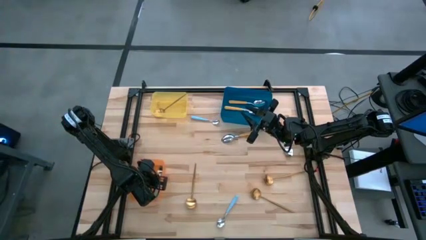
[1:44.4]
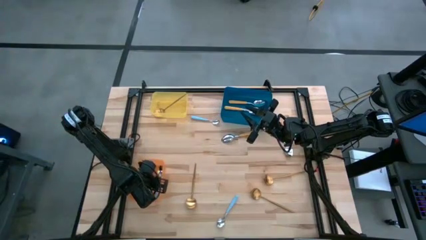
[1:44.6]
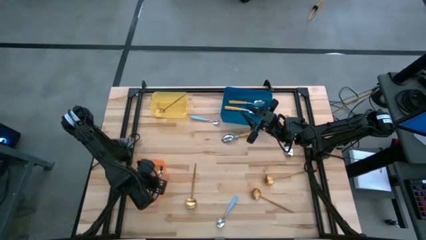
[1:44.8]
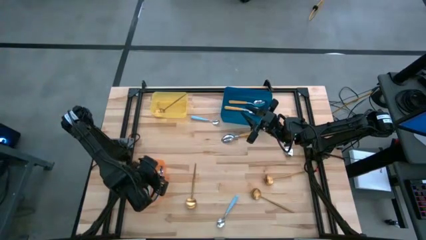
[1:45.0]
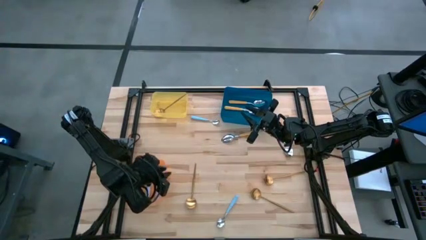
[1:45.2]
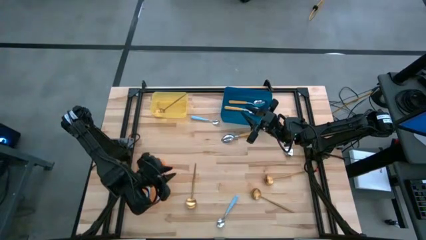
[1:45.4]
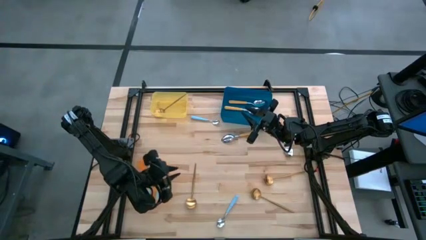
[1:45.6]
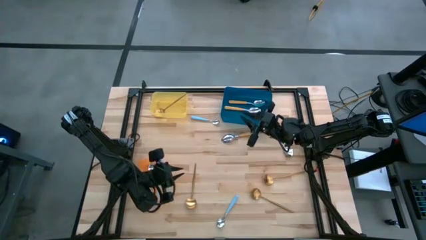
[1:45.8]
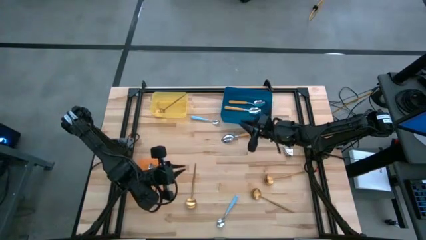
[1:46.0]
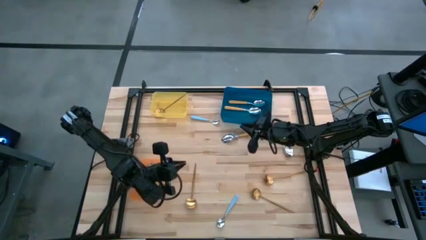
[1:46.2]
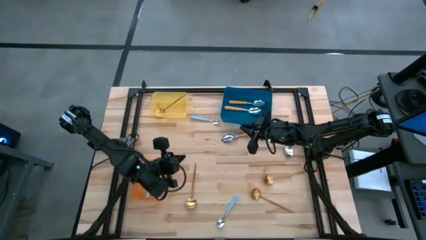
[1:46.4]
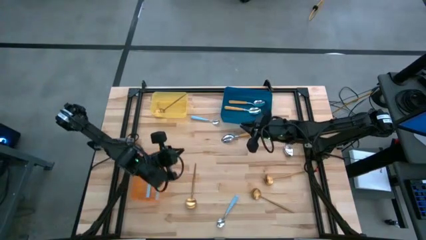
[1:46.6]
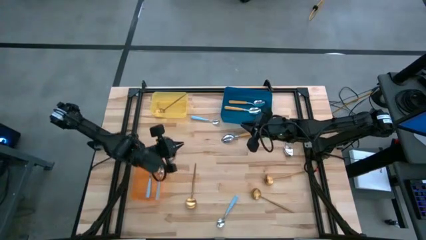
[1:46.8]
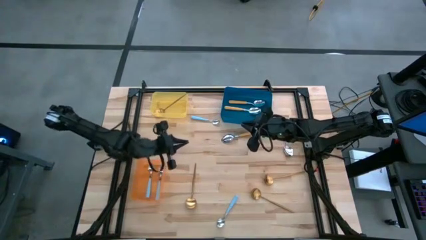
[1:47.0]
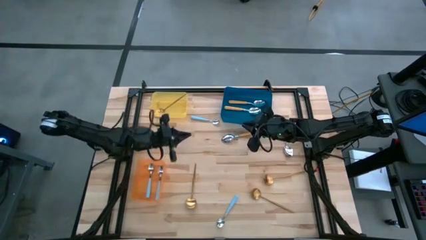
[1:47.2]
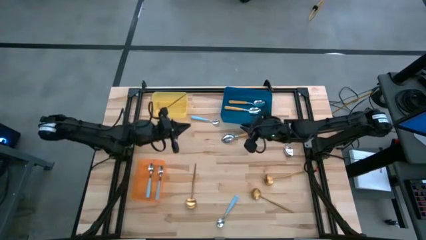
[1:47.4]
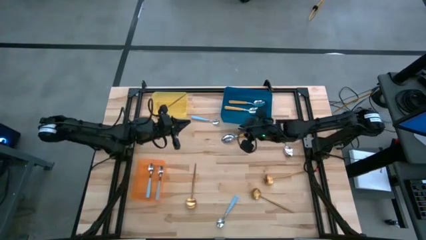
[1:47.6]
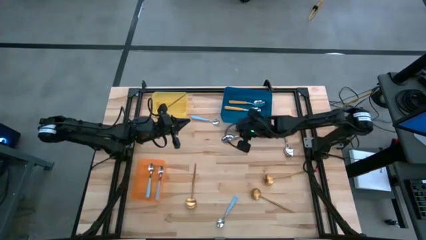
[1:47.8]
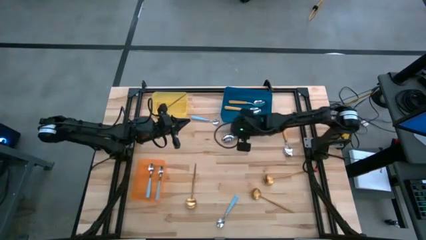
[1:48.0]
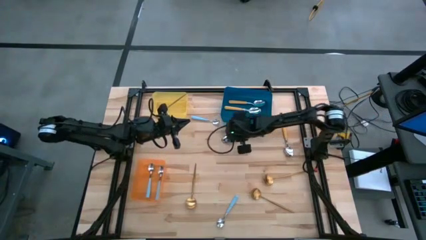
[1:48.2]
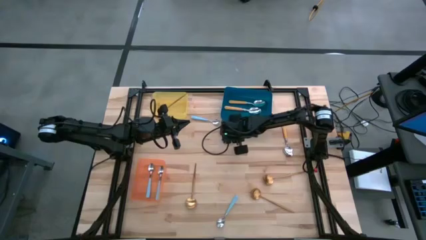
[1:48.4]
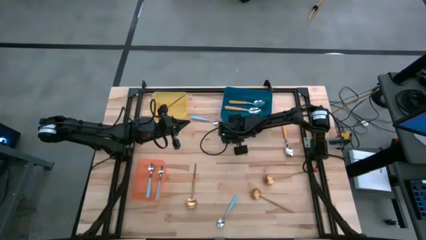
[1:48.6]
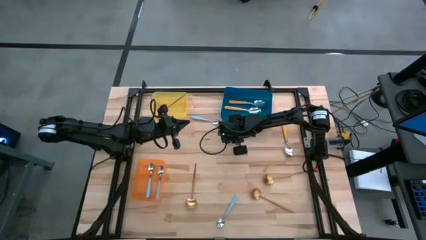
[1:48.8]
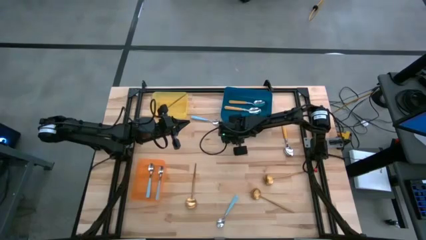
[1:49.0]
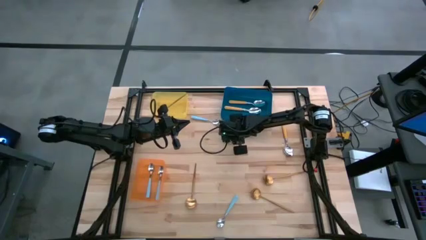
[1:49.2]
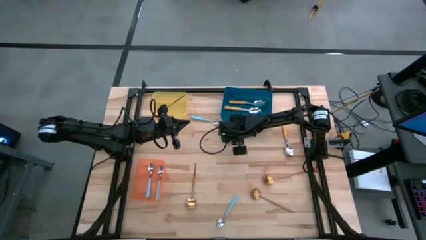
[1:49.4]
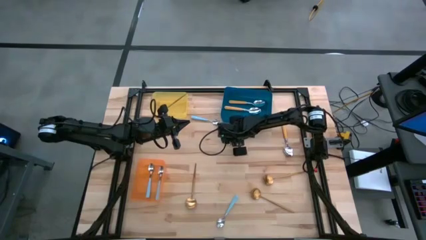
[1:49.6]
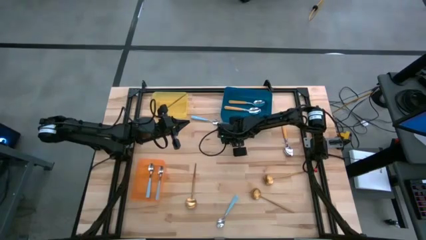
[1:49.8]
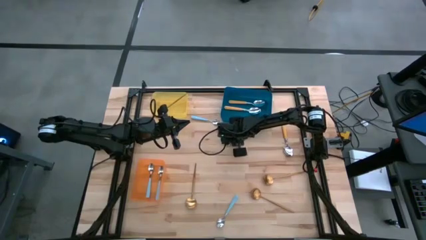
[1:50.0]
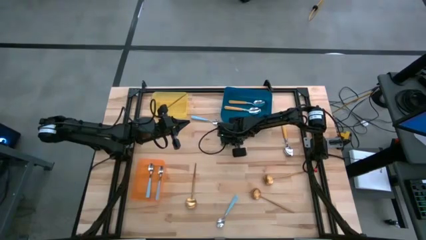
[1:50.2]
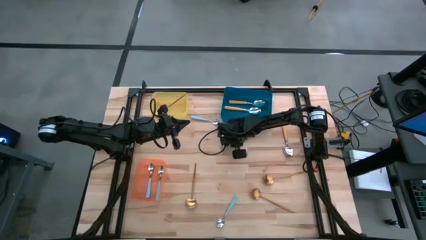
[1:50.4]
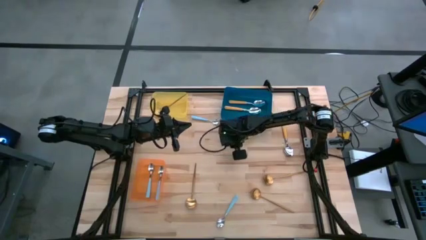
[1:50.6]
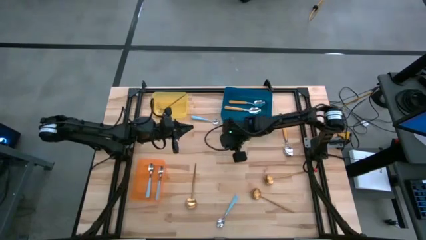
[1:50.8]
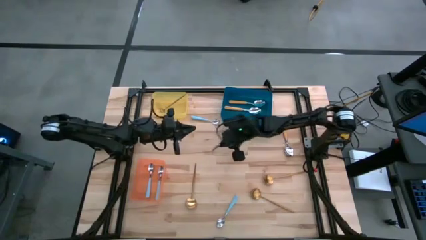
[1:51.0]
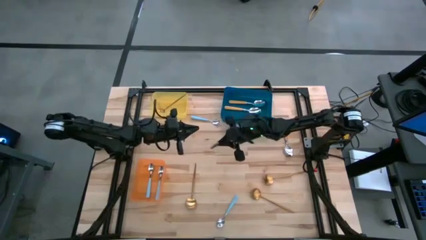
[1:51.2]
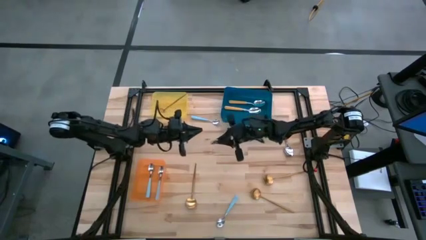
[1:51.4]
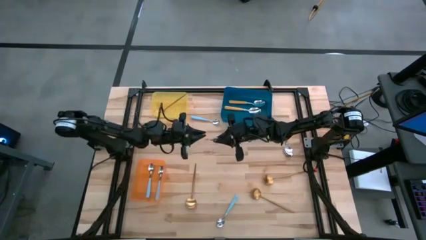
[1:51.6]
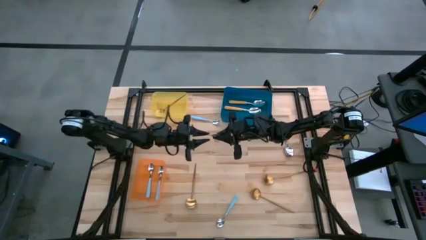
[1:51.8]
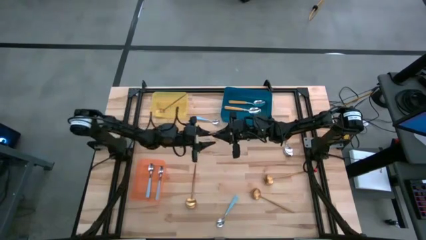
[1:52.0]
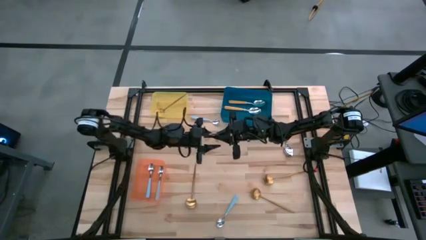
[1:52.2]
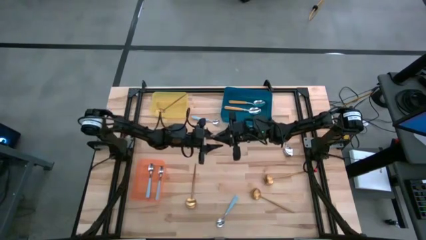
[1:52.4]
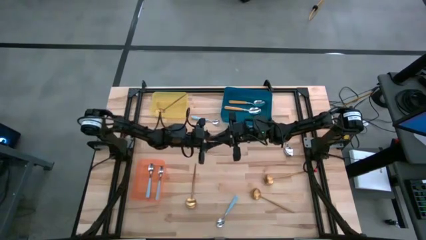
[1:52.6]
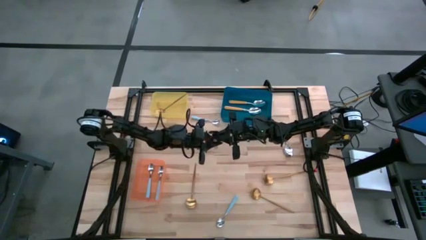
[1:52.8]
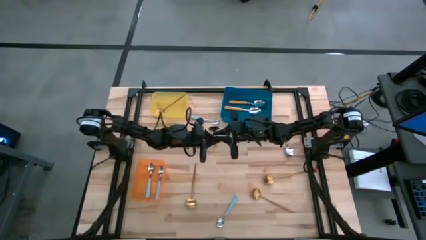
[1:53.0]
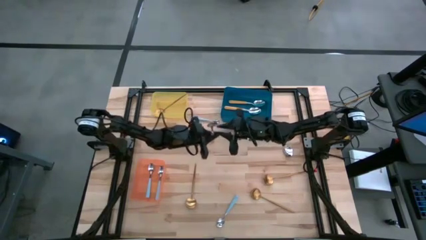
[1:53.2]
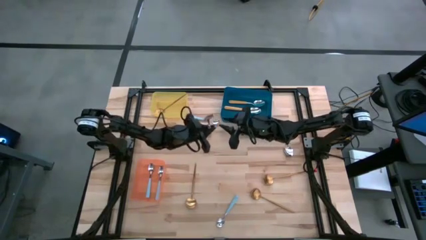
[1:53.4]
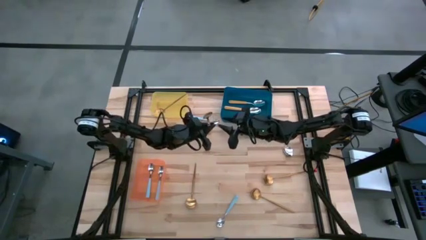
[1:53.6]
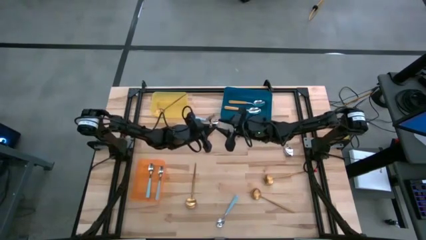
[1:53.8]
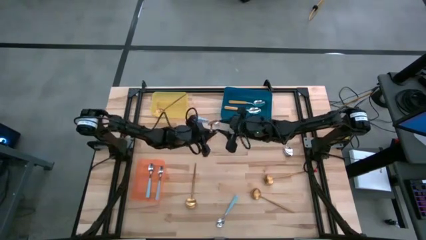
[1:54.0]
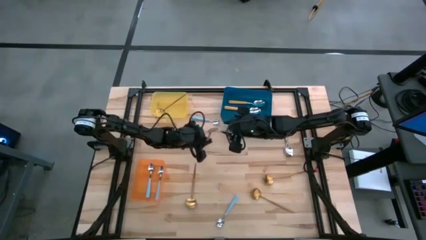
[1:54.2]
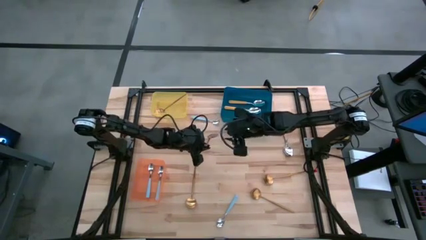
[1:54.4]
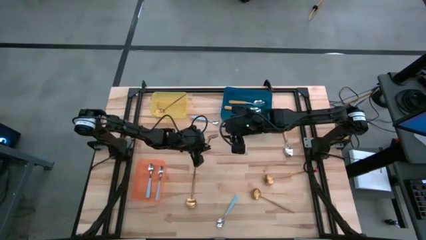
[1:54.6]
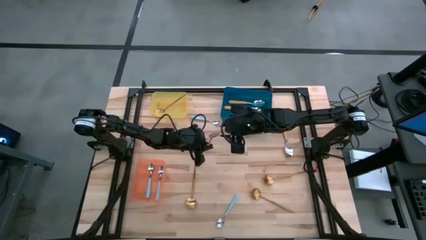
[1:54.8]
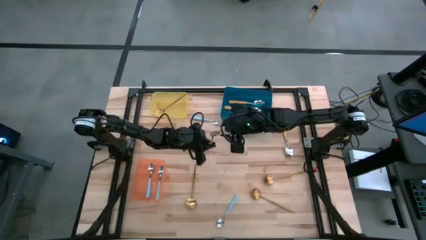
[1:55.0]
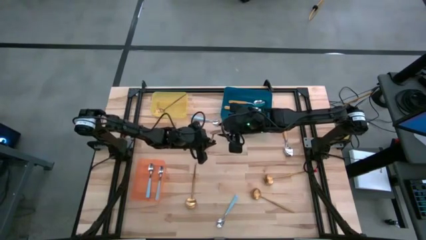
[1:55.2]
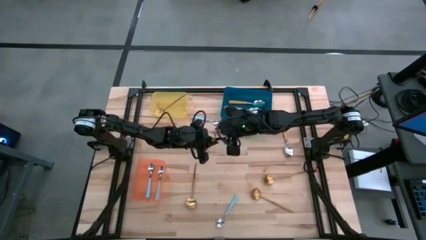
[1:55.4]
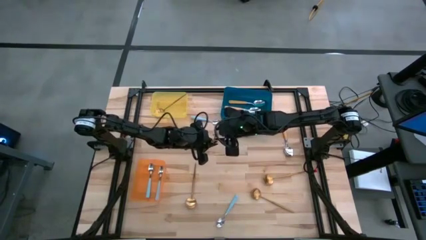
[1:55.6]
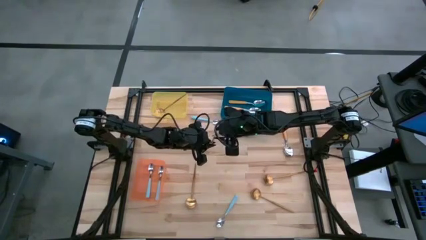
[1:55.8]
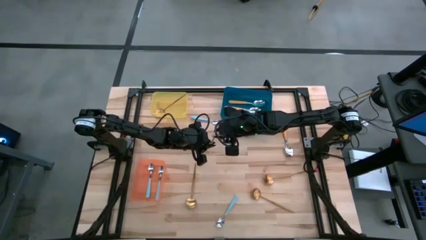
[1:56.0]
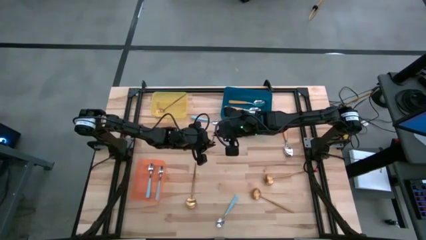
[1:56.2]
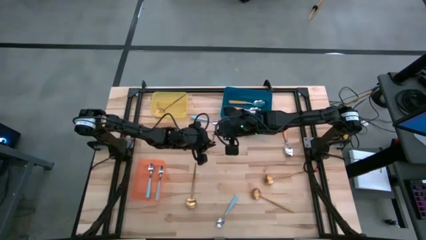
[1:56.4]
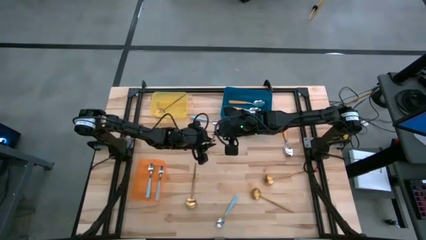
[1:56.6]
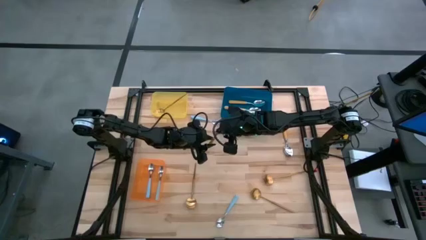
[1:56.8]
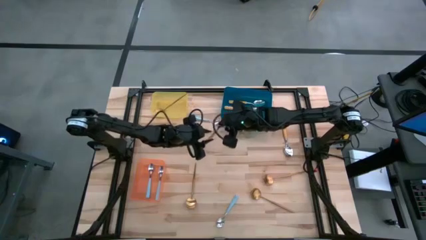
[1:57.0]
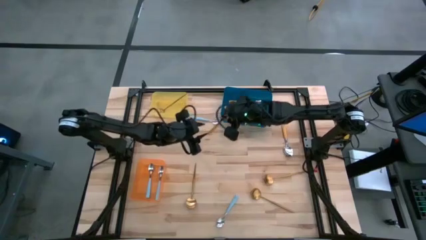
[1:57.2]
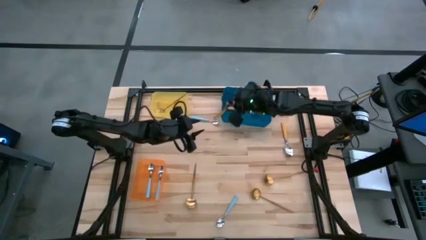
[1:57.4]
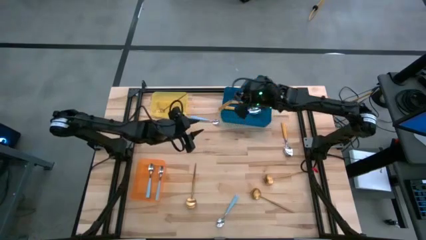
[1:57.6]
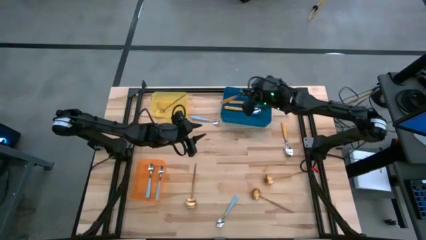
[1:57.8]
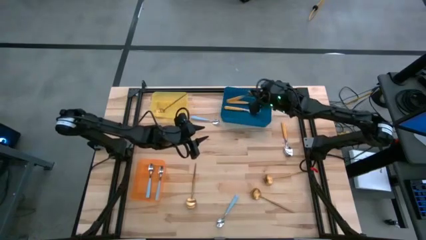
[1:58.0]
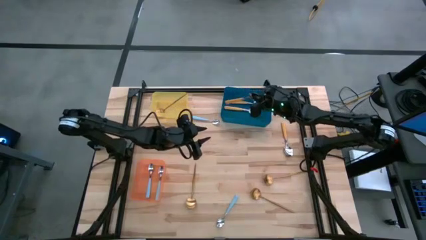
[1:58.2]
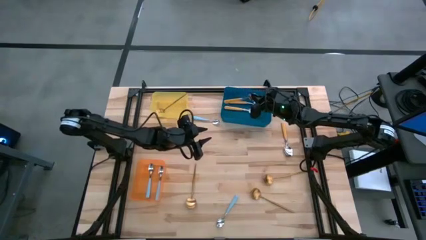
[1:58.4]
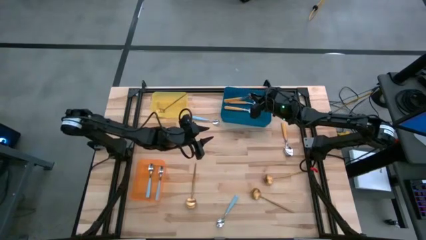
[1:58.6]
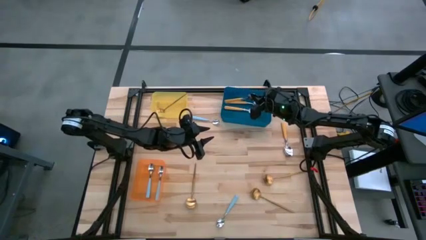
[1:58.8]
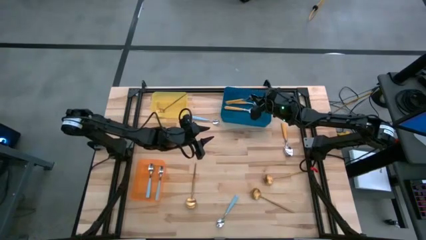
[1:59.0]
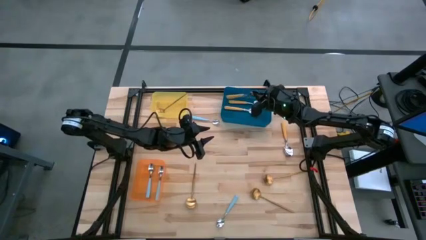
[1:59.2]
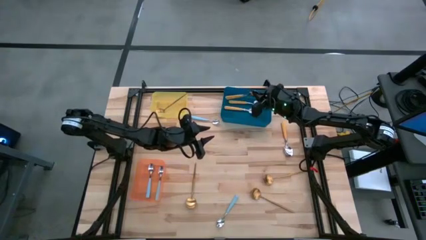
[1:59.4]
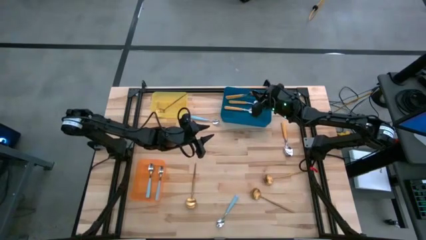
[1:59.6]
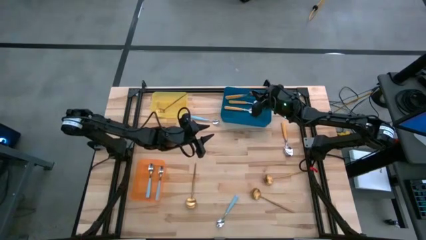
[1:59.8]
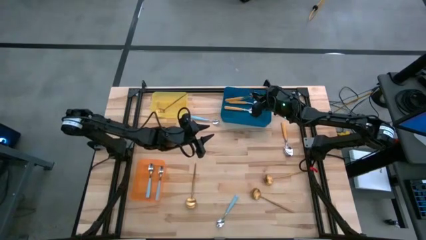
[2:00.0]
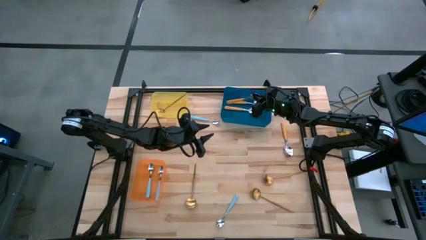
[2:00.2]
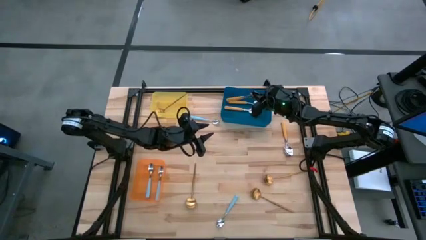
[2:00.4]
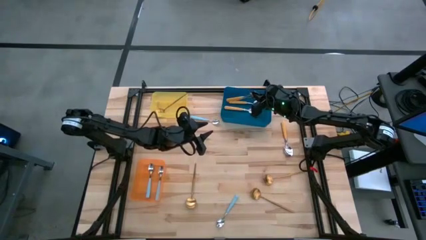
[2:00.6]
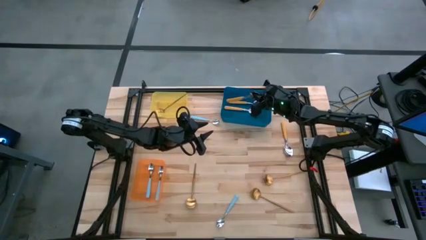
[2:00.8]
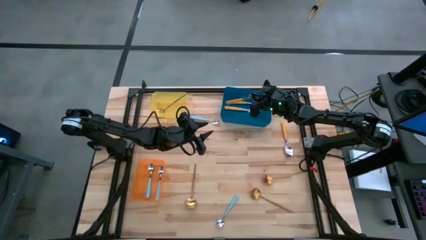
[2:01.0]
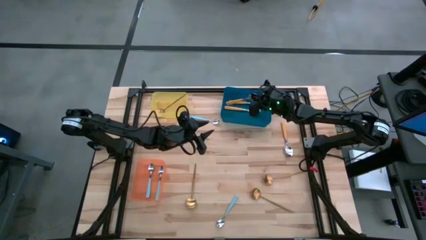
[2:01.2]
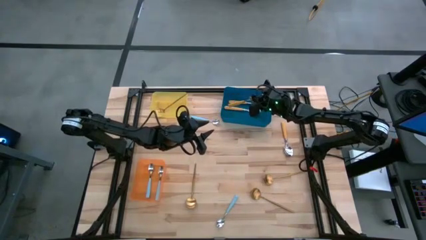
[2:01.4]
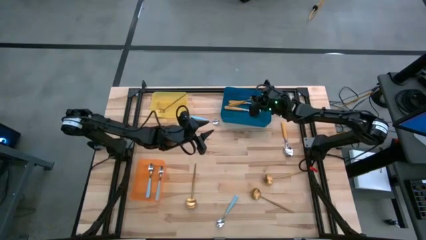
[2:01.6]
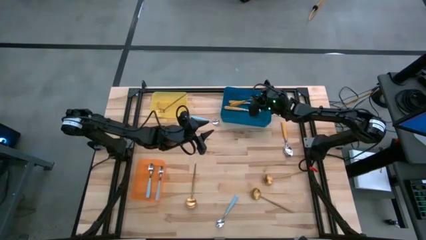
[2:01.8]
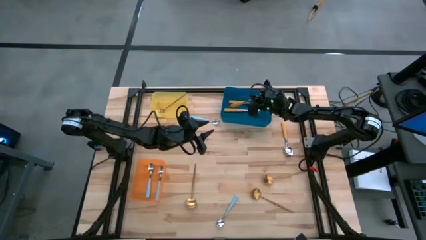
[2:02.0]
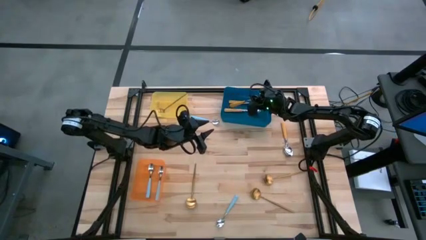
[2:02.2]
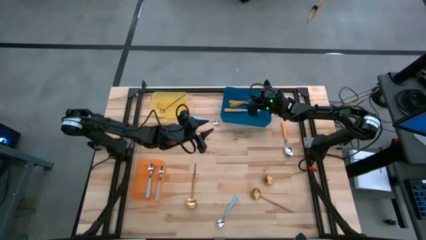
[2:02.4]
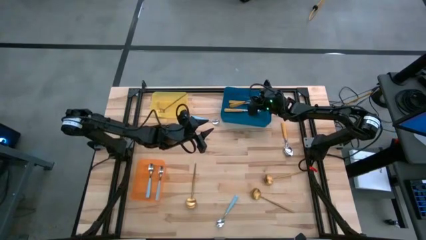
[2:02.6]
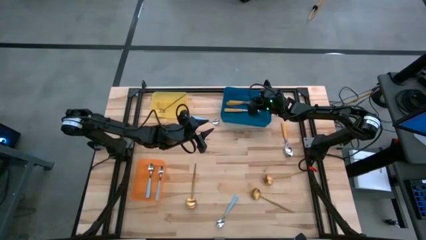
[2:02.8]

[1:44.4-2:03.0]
Task: Sort silverware by color (type)
Put the orange spoon into the blue bin
